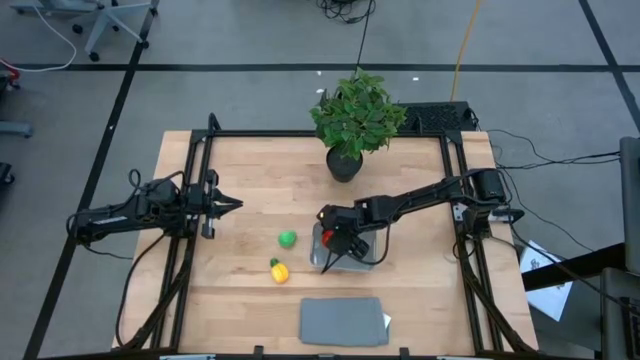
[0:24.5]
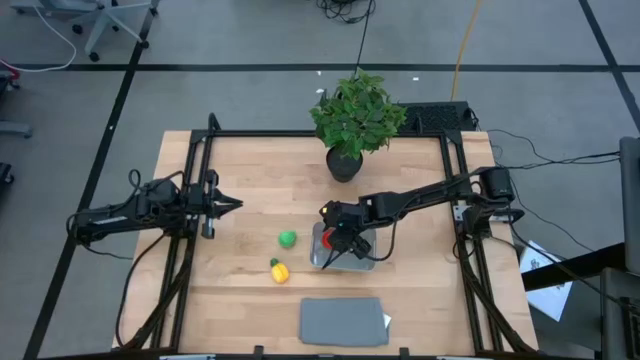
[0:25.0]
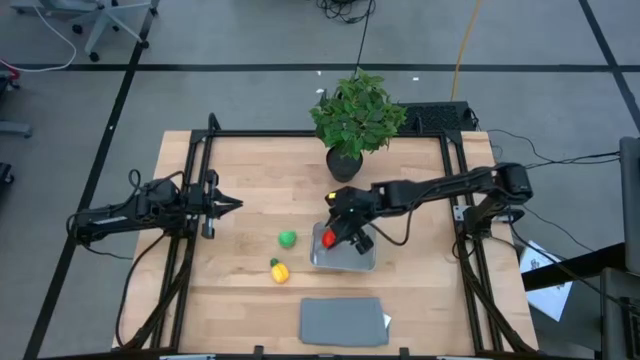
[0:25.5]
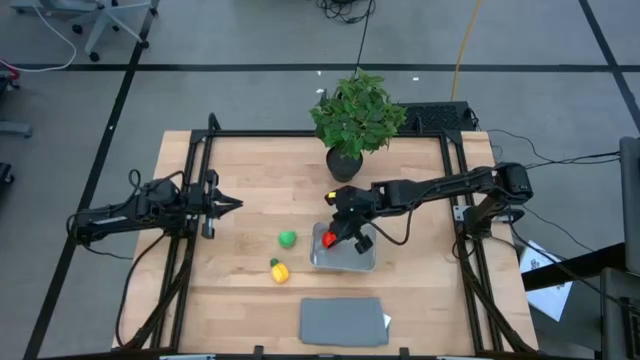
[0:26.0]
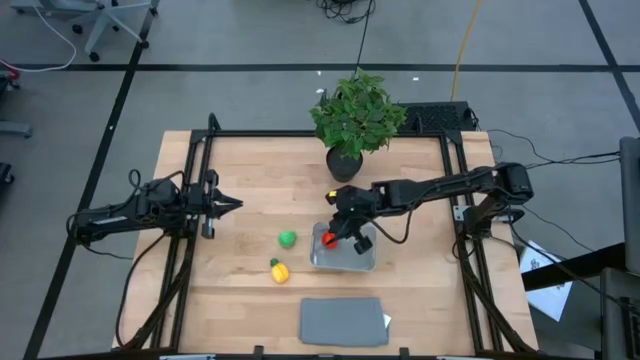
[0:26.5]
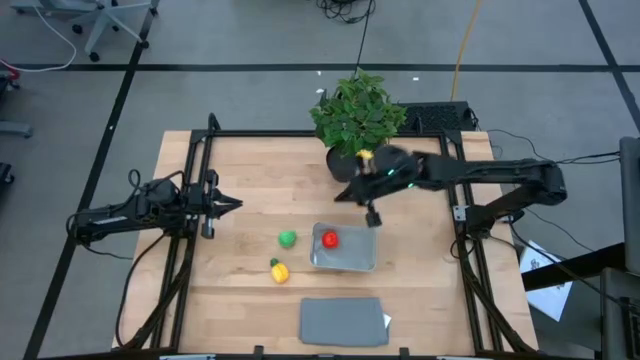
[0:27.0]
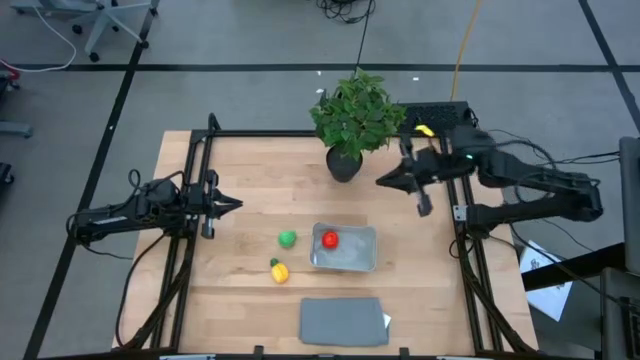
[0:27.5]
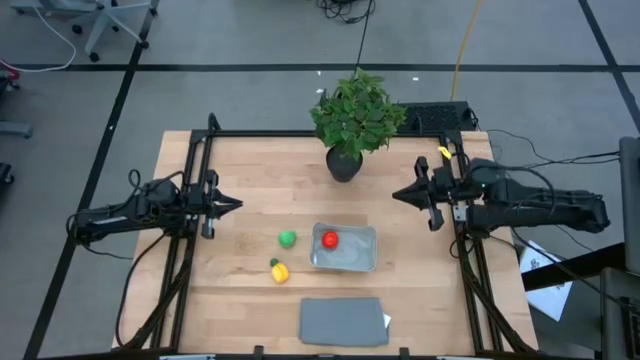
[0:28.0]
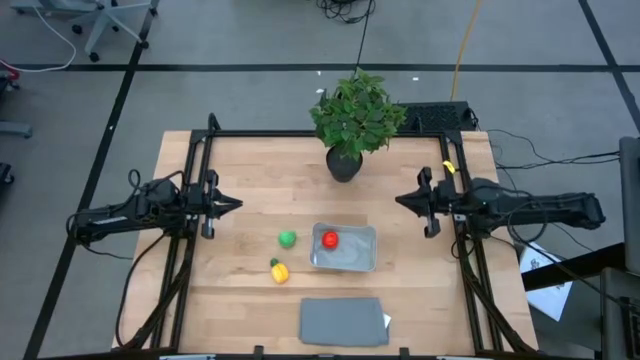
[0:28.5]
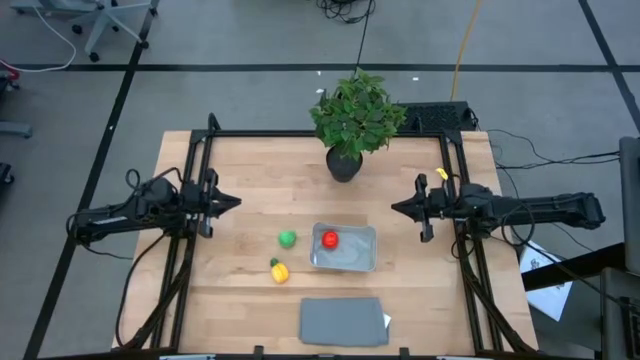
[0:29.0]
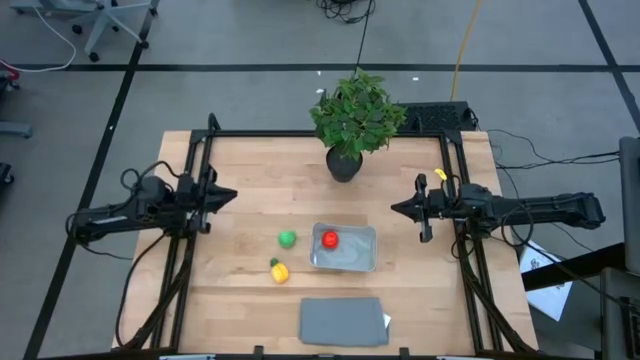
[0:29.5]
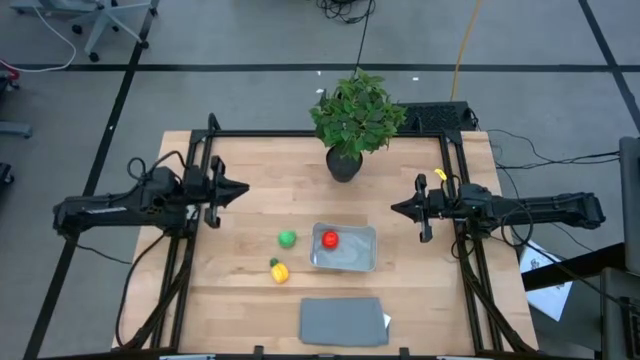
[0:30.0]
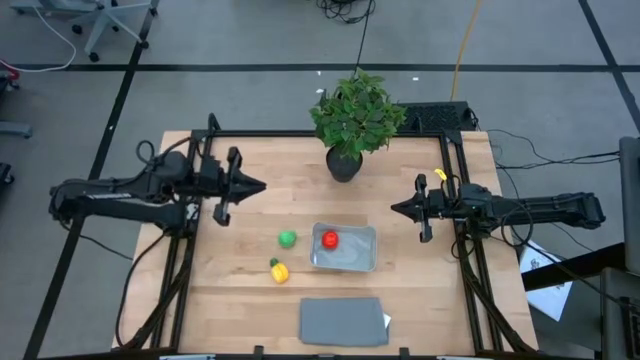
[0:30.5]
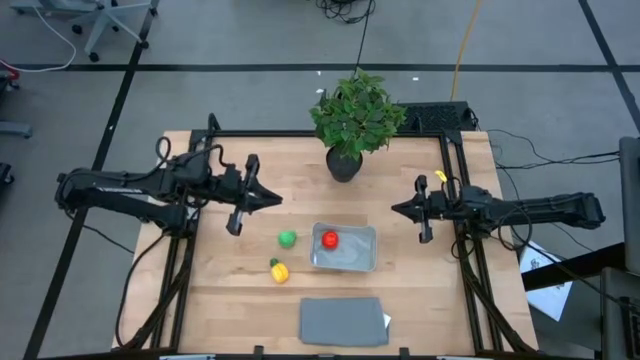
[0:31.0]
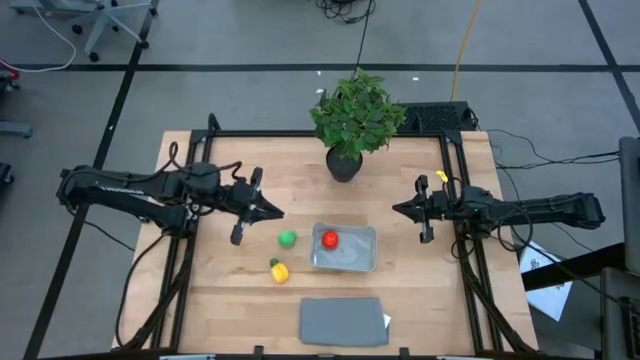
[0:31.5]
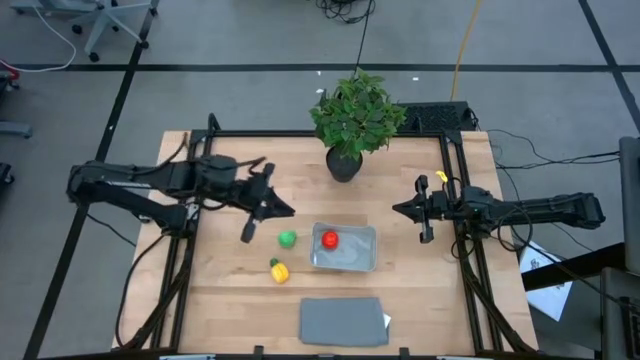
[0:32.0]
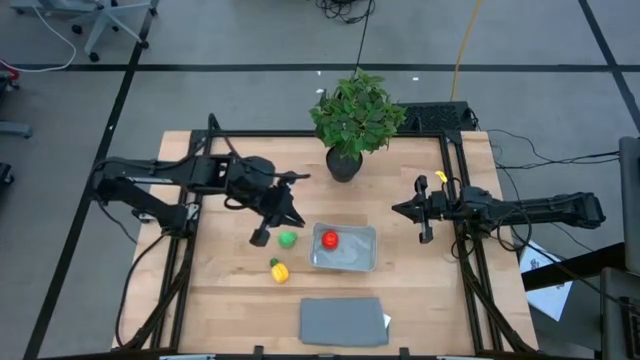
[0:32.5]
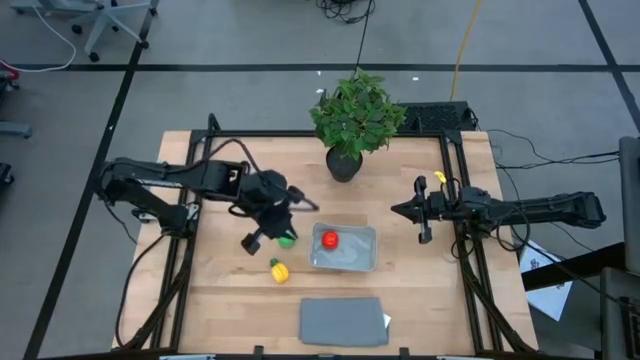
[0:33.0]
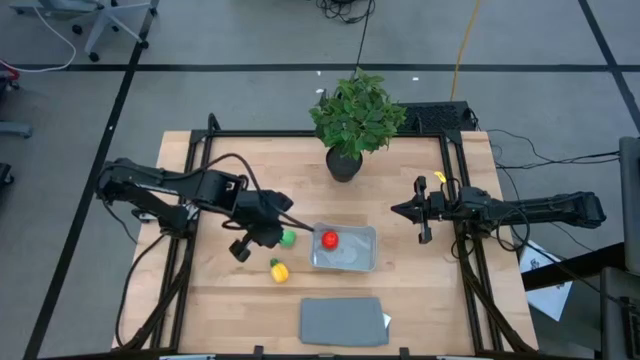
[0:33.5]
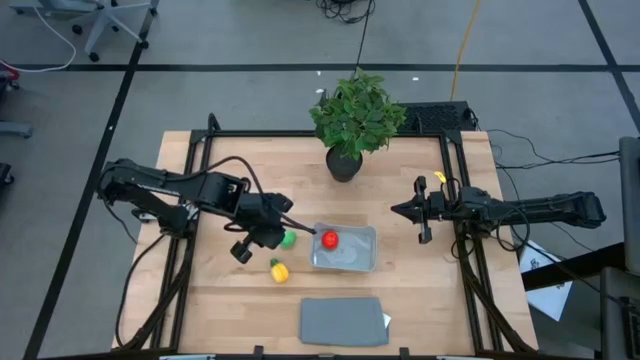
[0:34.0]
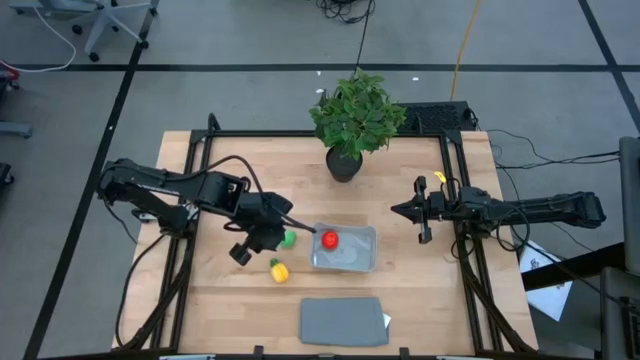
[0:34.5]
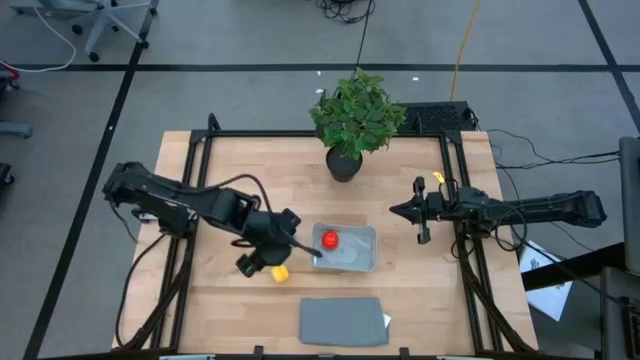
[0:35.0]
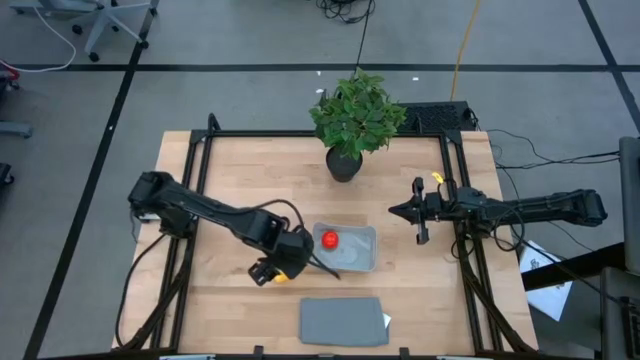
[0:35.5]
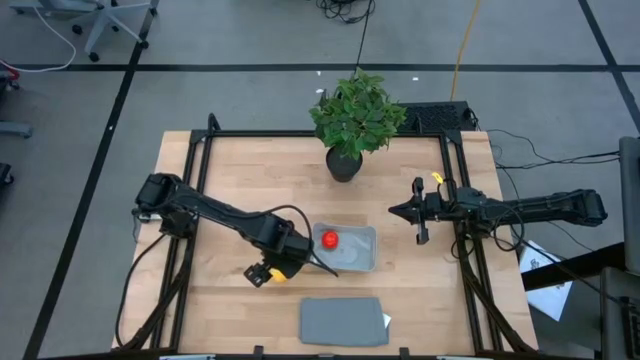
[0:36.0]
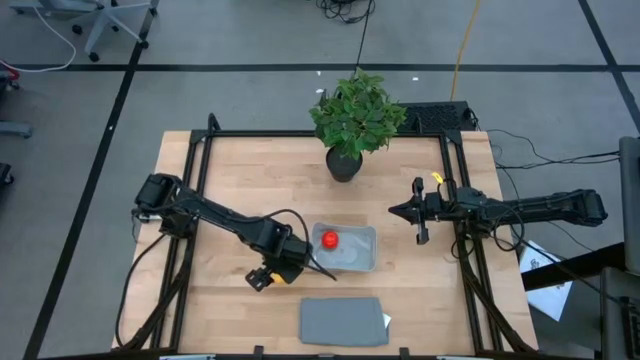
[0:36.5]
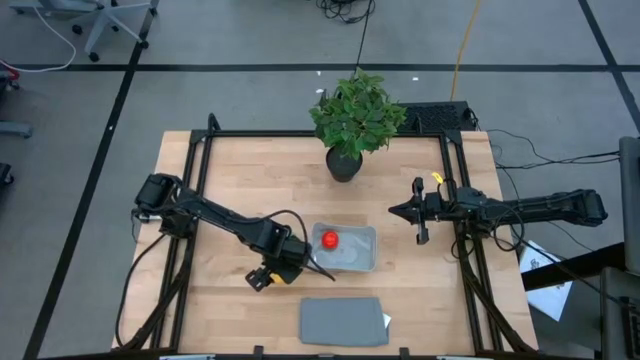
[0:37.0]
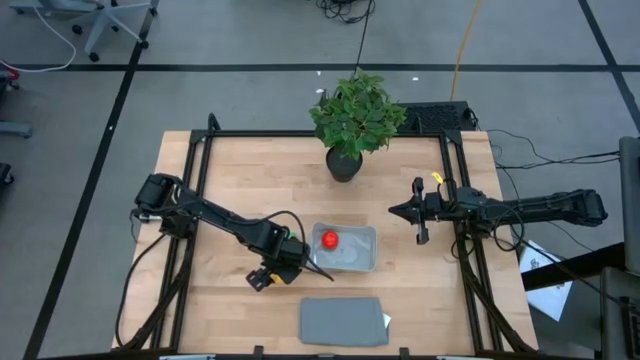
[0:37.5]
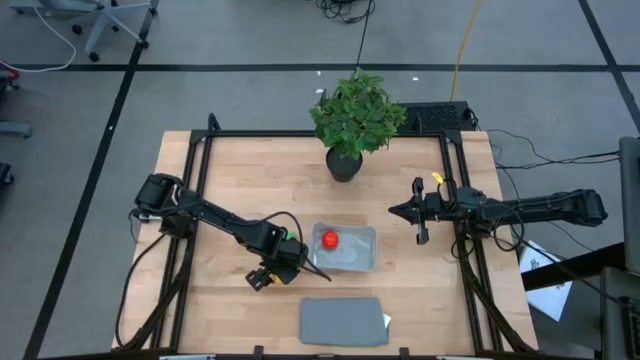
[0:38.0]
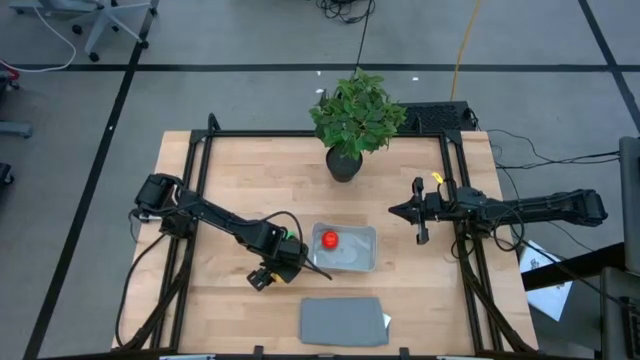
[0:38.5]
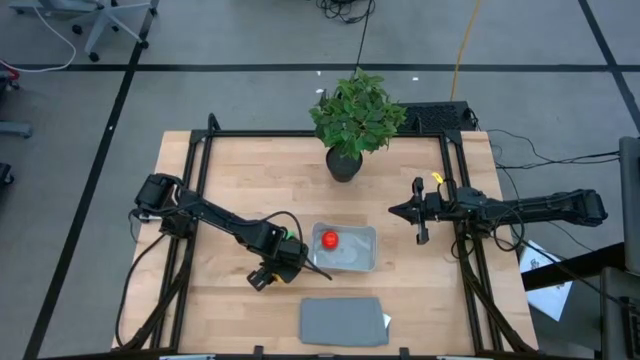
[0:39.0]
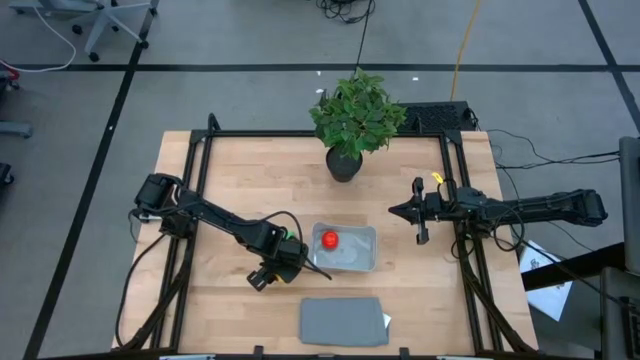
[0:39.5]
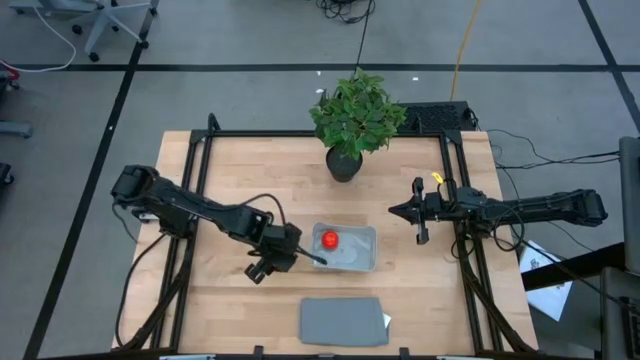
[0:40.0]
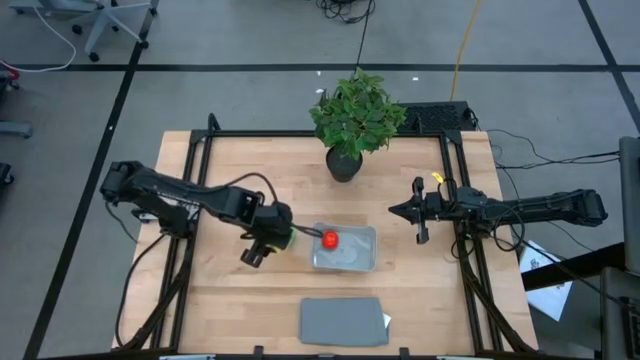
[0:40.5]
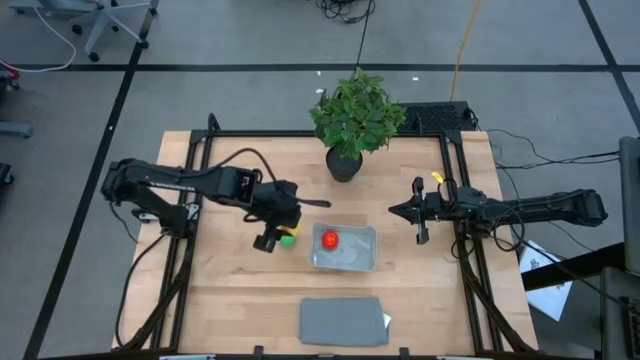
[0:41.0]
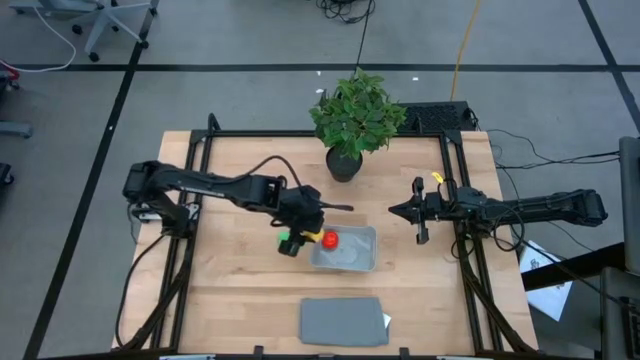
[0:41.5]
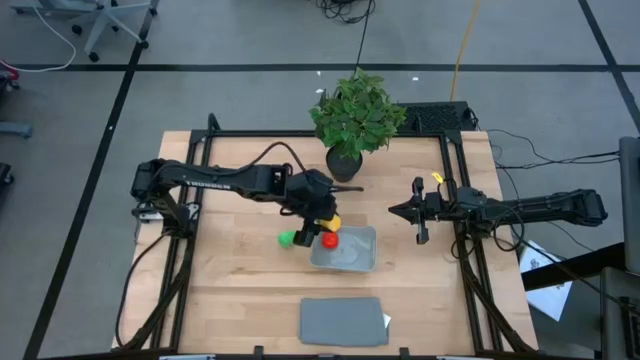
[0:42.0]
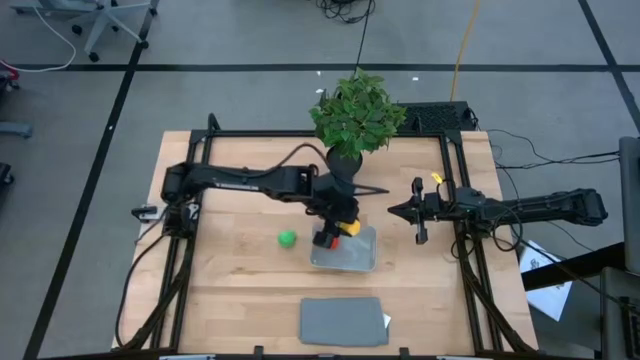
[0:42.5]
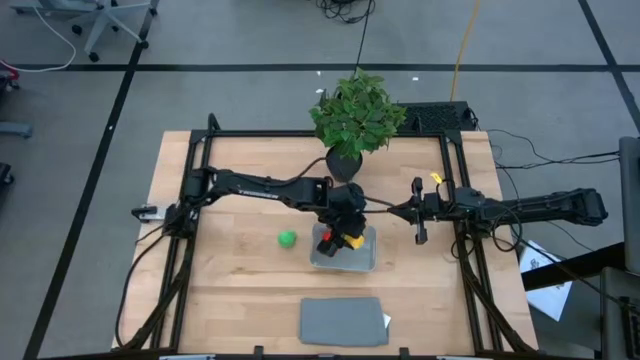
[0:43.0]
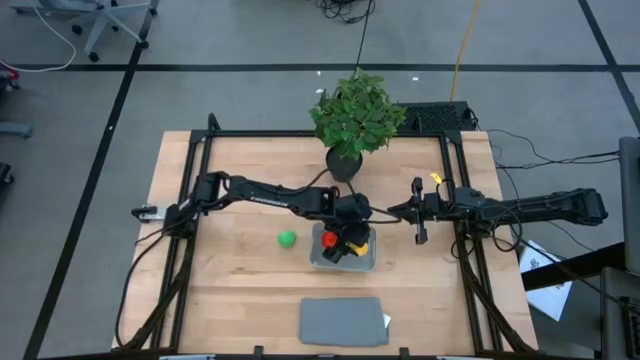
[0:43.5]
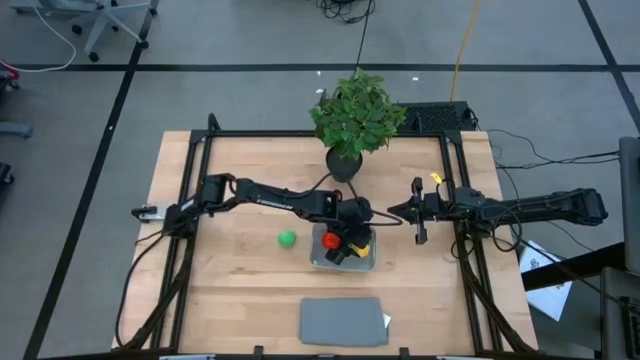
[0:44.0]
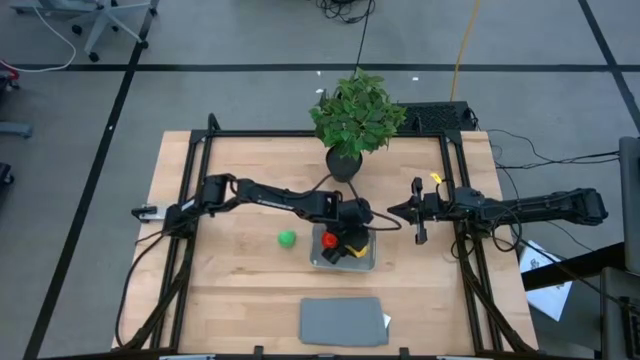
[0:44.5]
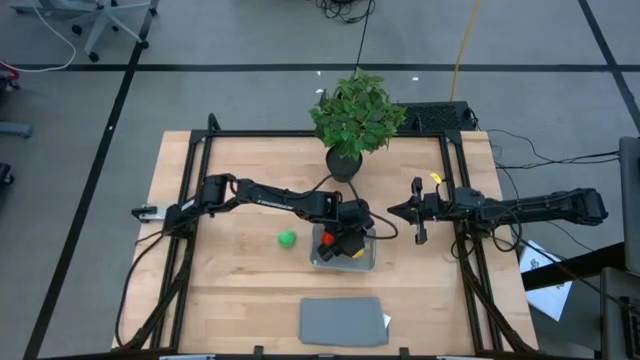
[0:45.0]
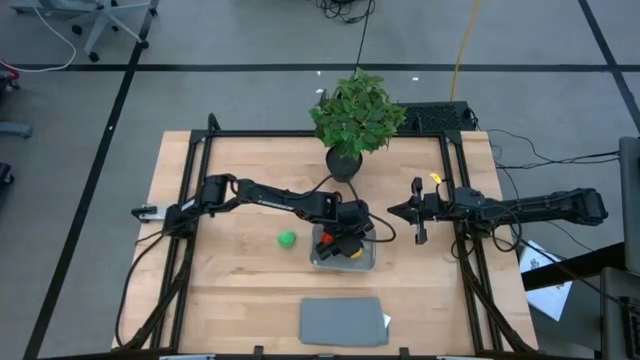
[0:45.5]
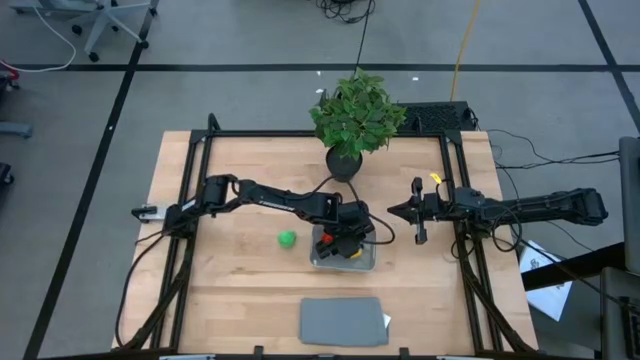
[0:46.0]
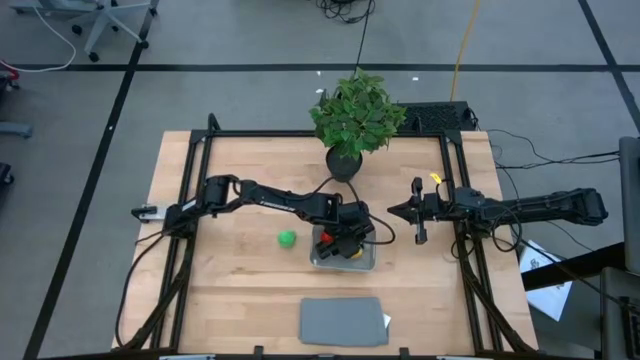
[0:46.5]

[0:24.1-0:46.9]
Task: Pick and placing Produce into tupperware
Put the pineapple into the basket
